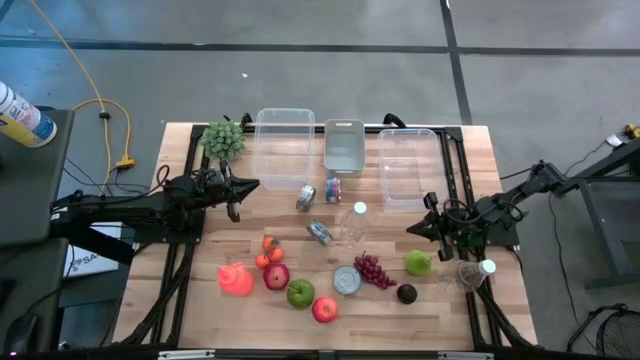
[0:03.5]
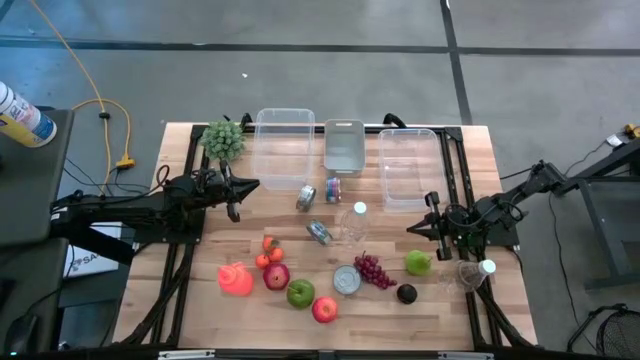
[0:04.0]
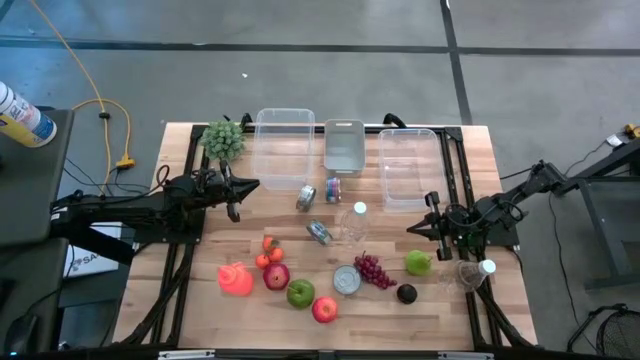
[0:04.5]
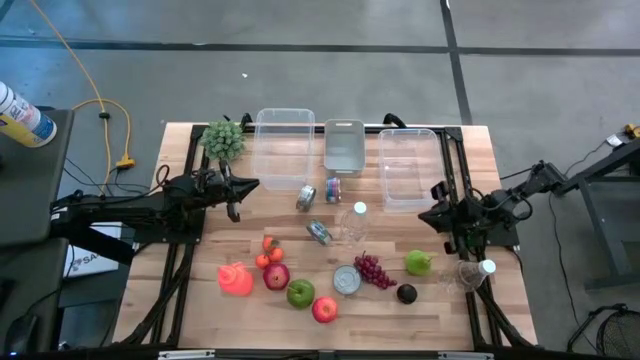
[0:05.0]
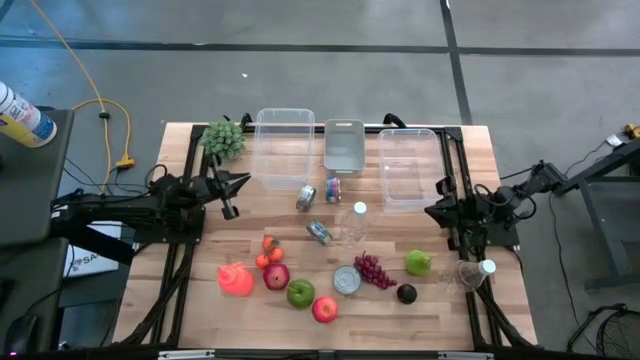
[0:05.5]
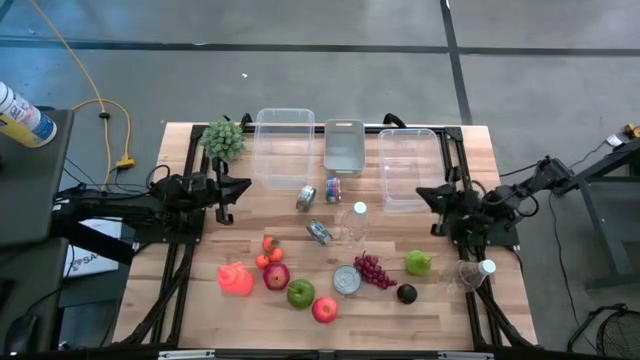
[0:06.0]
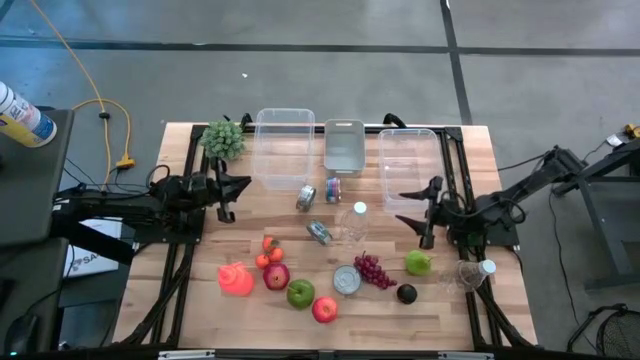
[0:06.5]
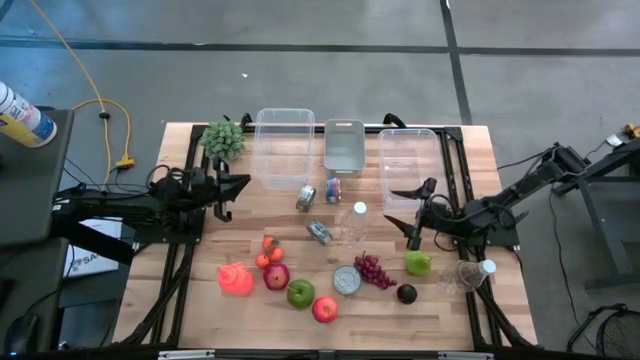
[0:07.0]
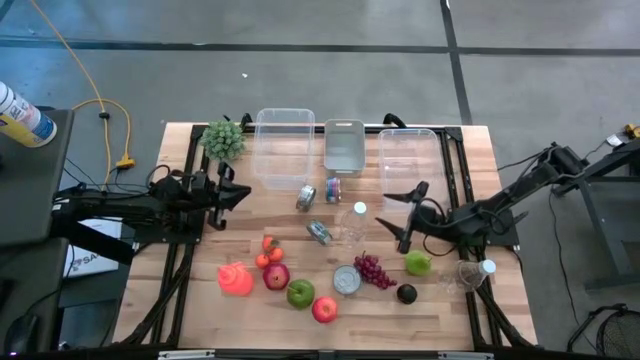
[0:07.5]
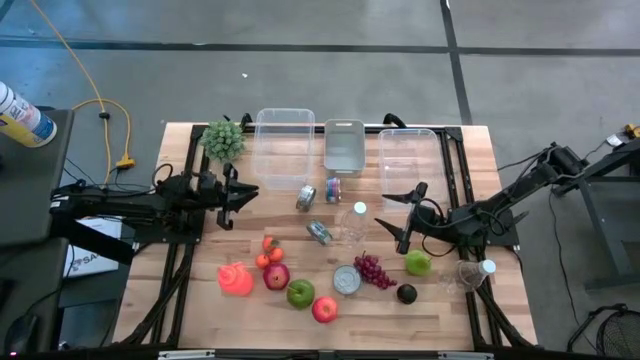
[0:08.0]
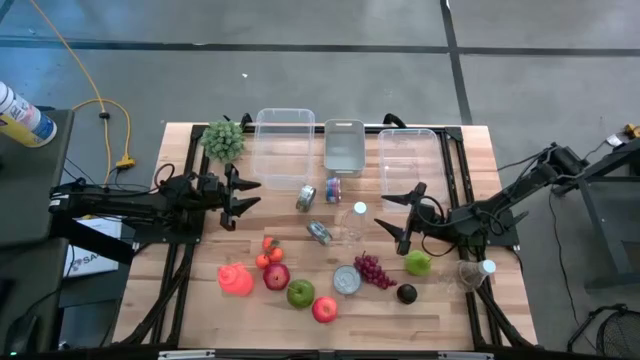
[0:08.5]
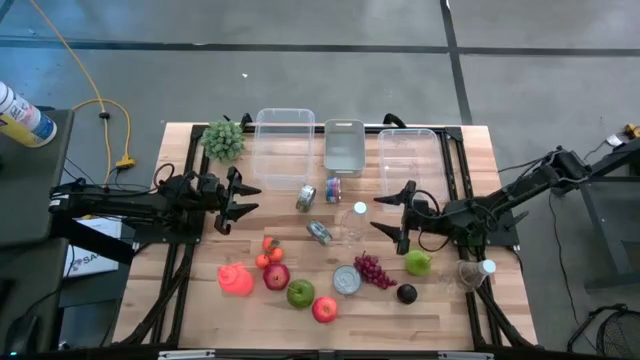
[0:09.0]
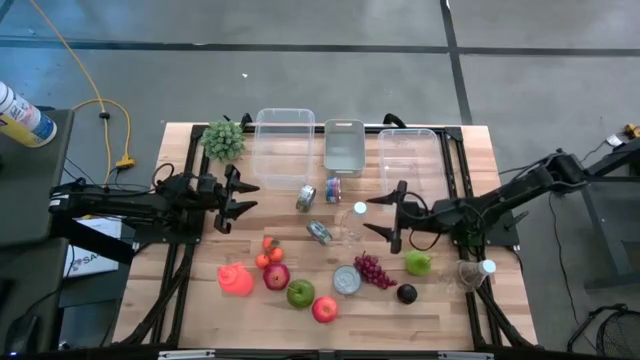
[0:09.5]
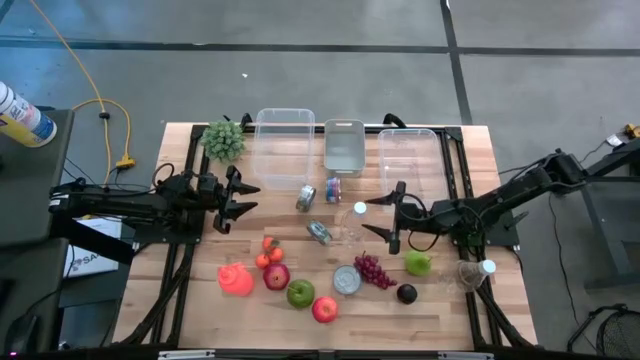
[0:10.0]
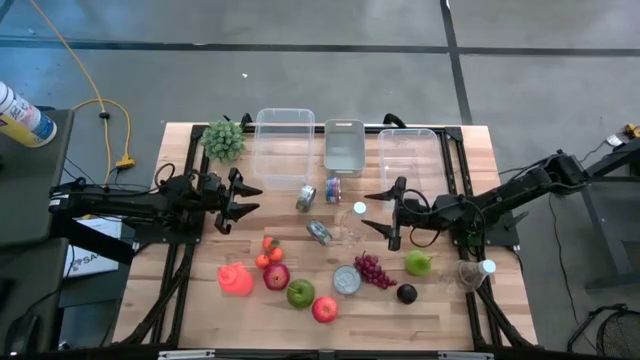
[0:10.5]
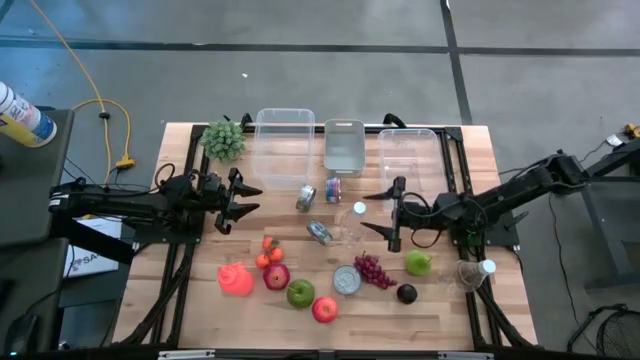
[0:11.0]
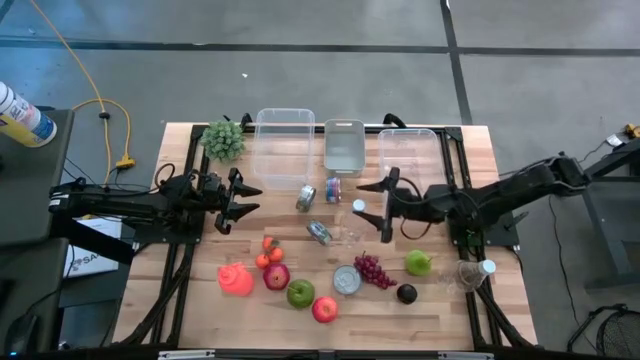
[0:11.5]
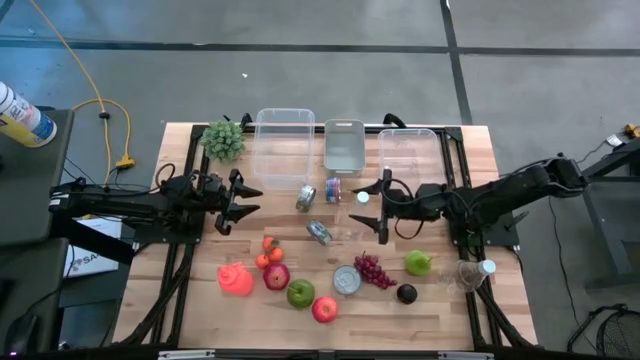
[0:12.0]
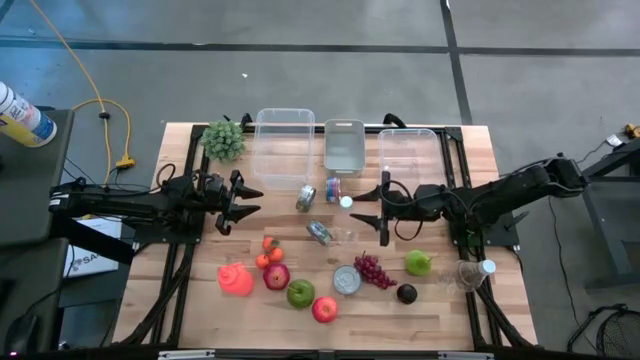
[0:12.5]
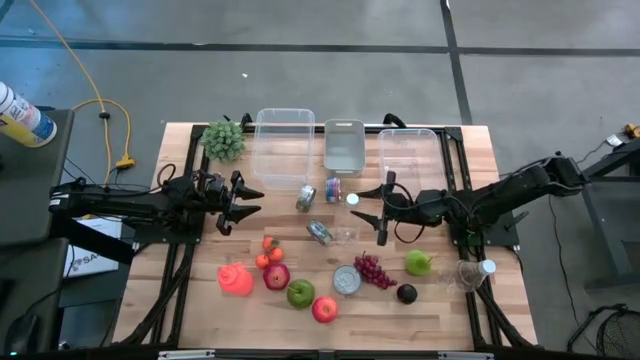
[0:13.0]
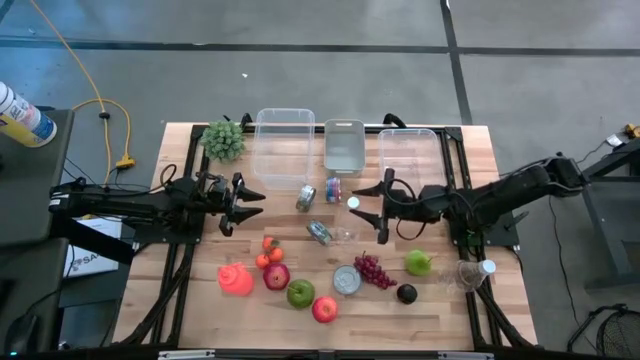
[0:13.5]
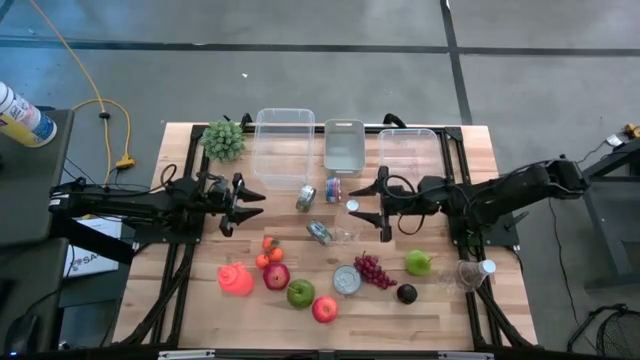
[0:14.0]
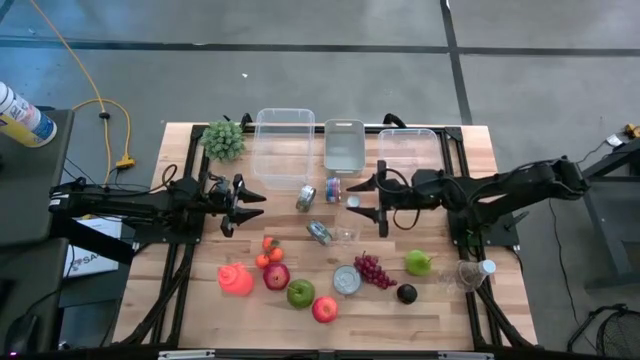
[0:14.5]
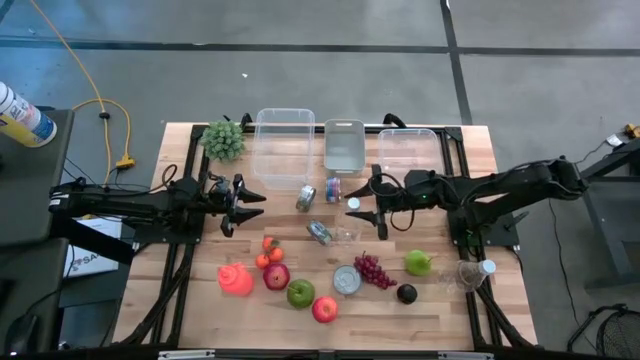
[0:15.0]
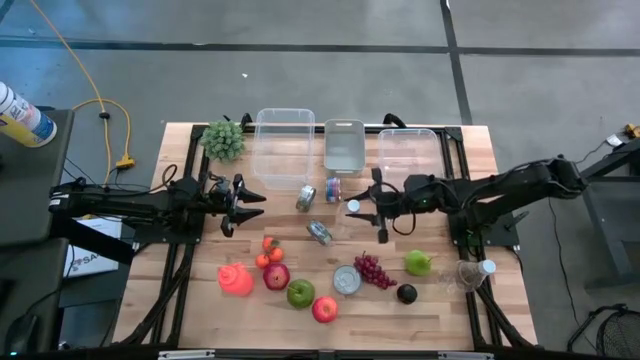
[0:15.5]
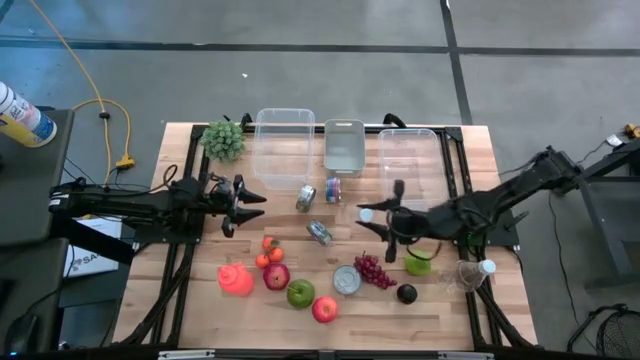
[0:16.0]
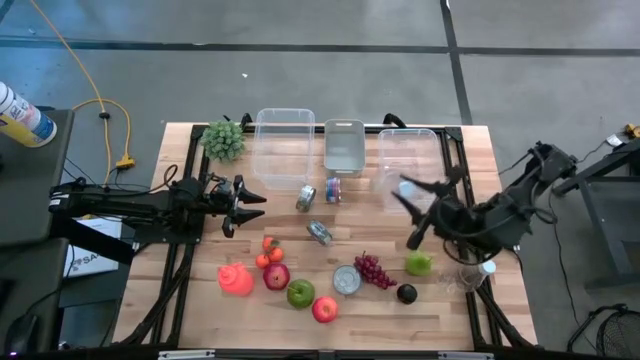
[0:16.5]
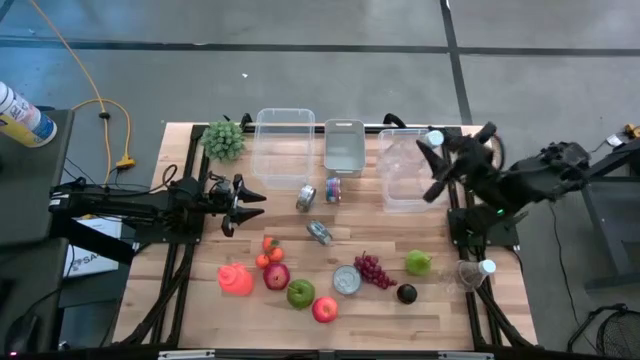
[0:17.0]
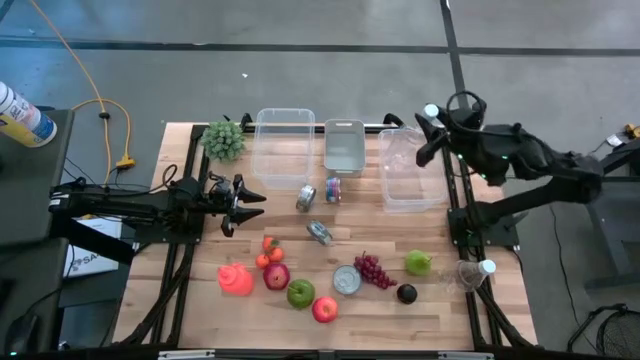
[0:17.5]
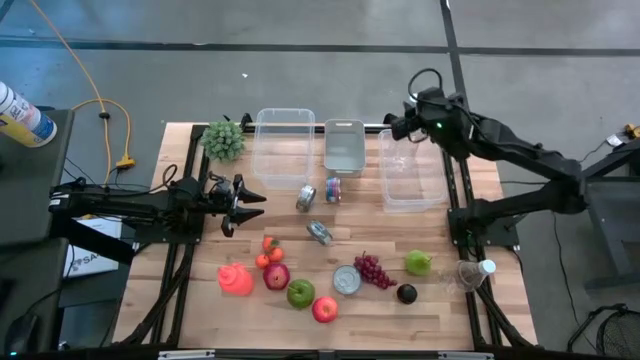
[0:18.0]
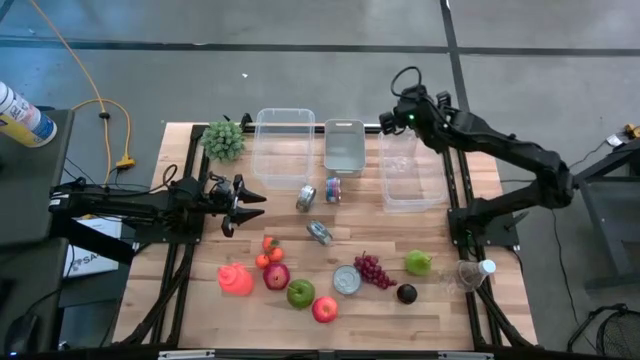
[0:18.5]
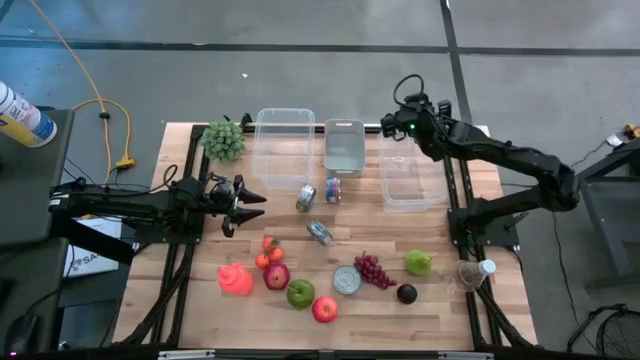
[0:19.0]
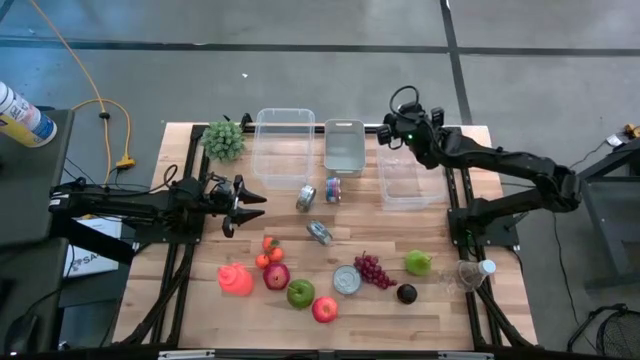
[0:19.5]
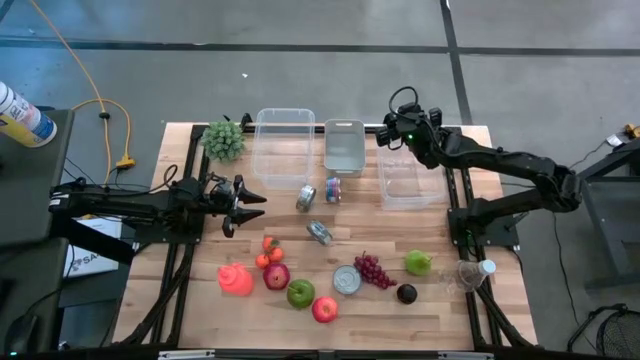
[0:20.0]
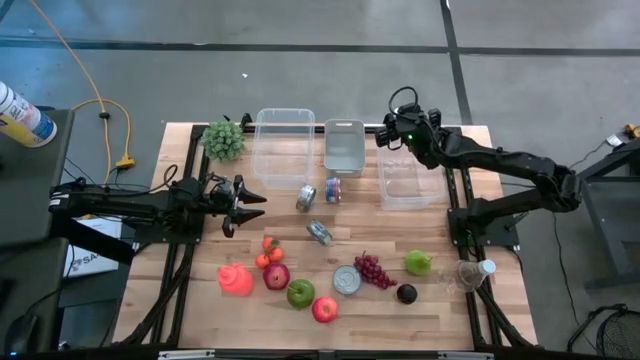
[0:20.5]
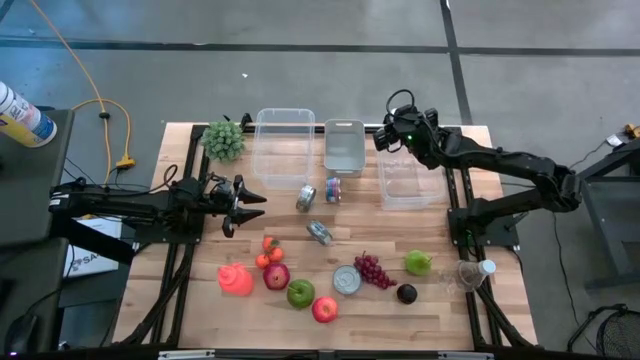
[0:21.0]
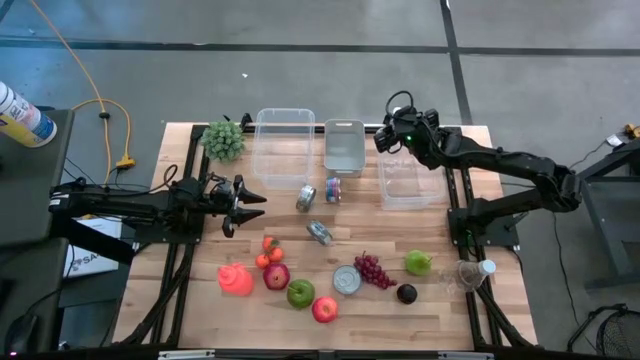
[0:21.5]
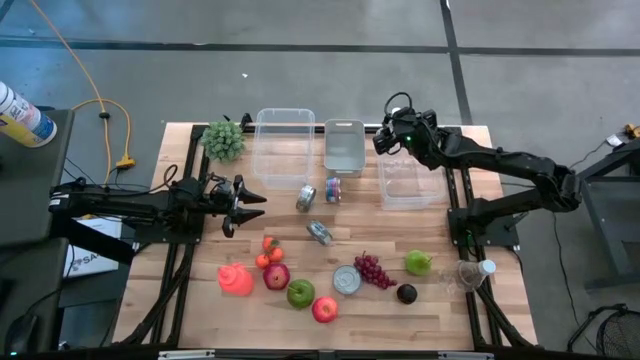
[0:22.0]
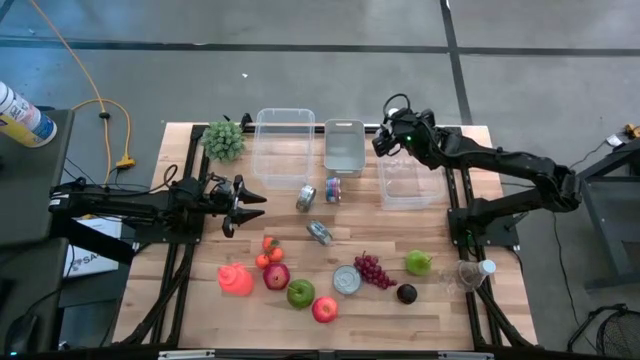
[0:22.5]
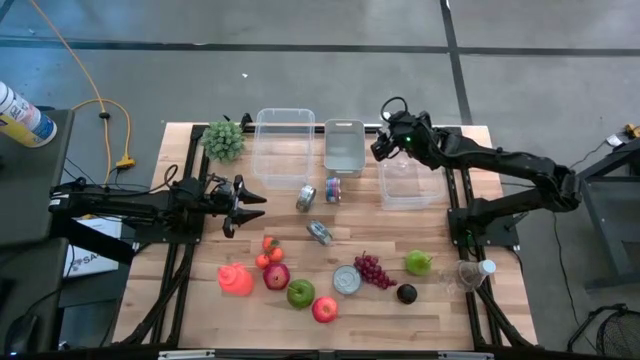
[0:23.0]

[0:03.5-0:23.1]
Task: Pick & Place Food Item
Put the left transparent water bottle into the right transparent bin
